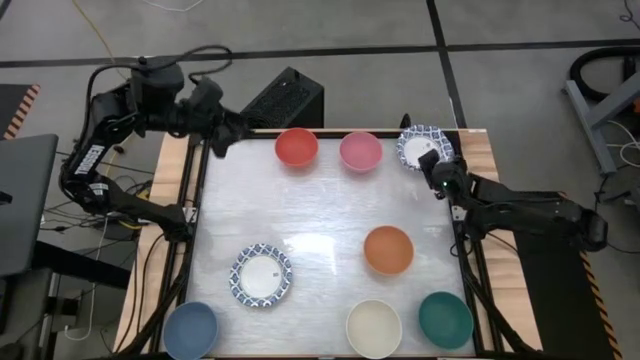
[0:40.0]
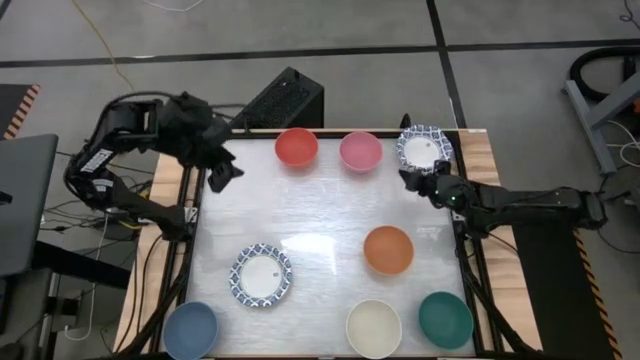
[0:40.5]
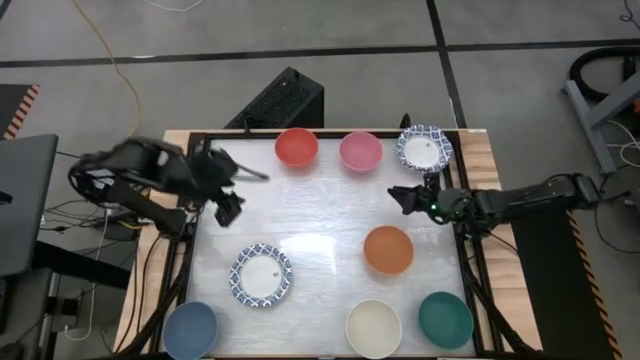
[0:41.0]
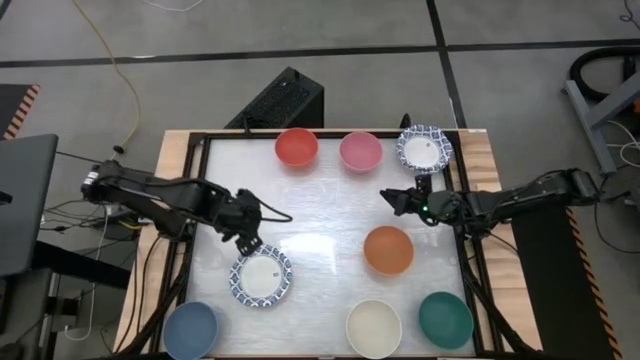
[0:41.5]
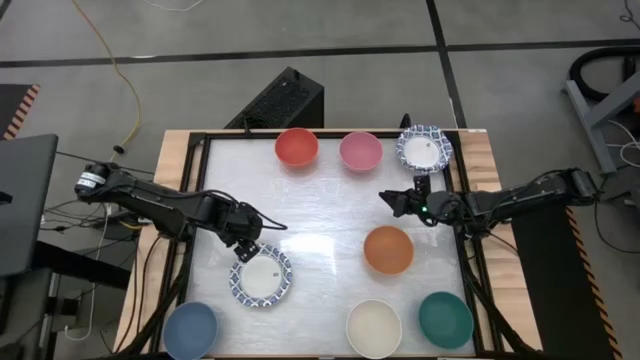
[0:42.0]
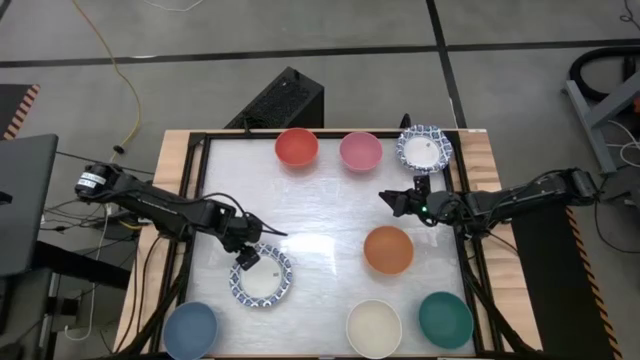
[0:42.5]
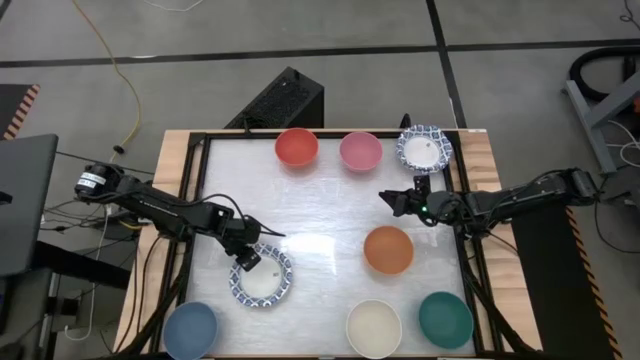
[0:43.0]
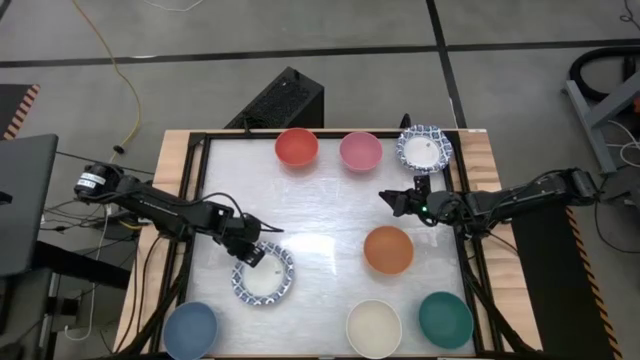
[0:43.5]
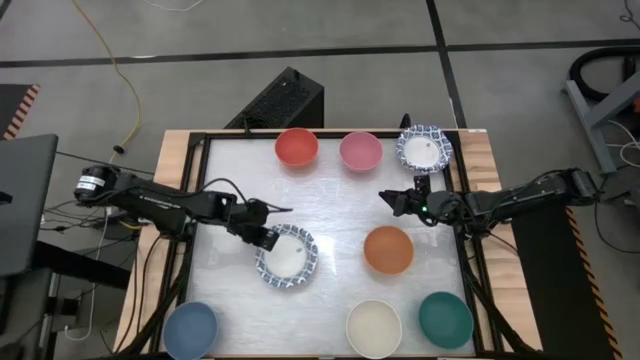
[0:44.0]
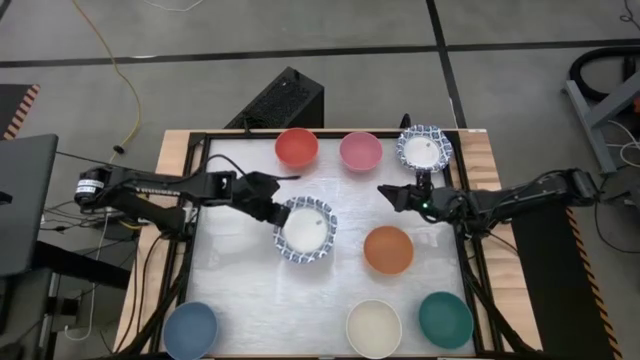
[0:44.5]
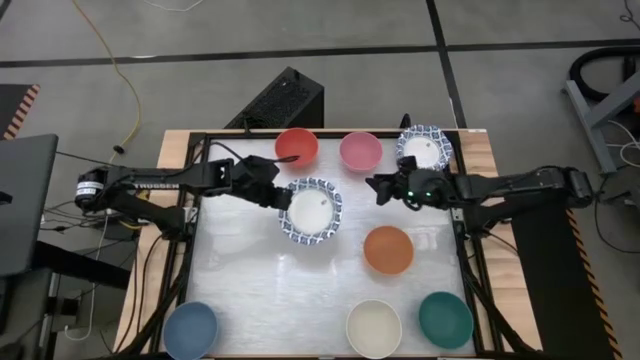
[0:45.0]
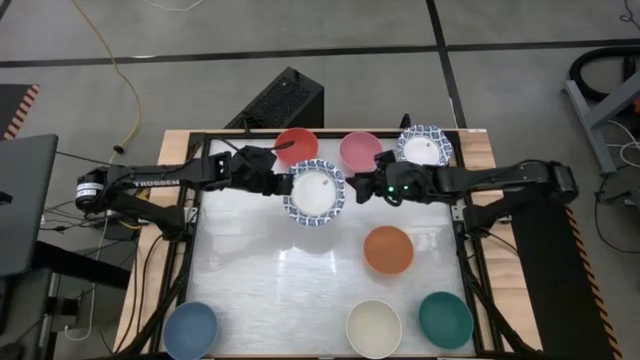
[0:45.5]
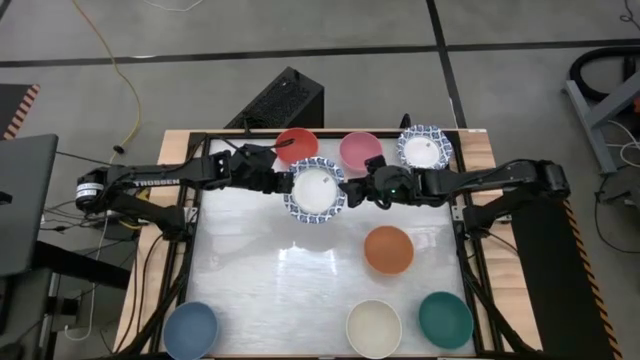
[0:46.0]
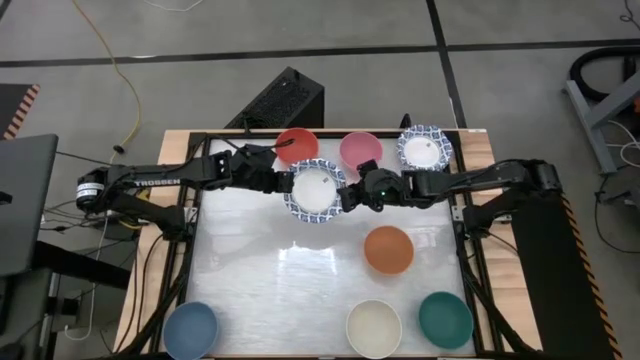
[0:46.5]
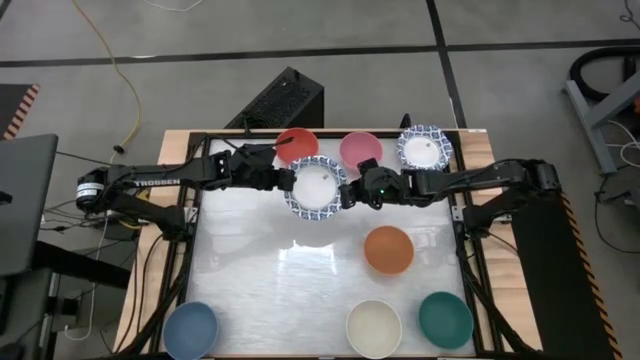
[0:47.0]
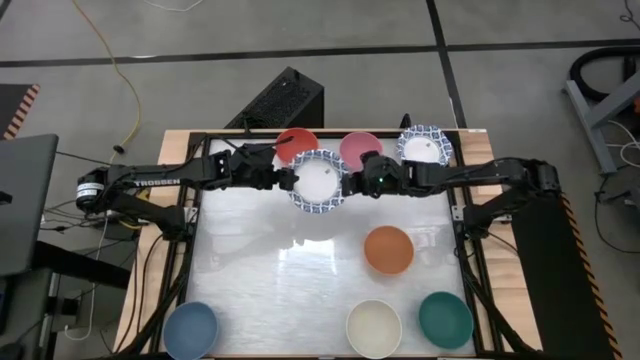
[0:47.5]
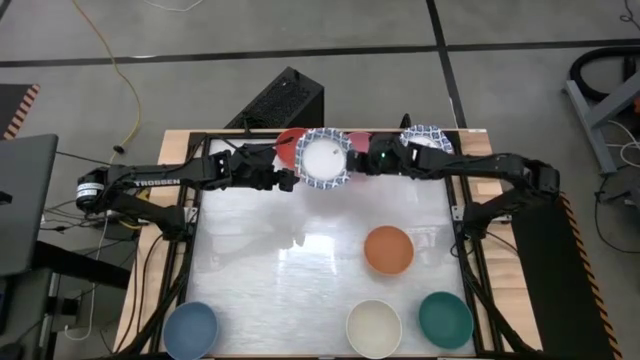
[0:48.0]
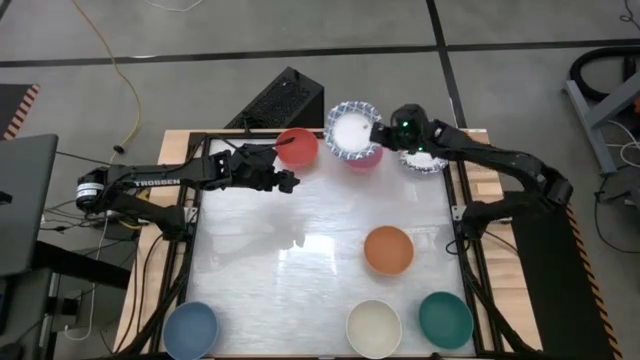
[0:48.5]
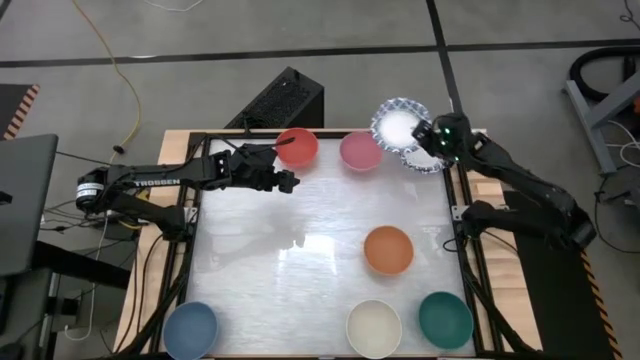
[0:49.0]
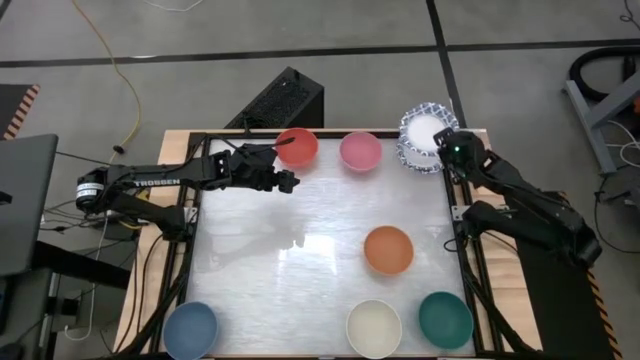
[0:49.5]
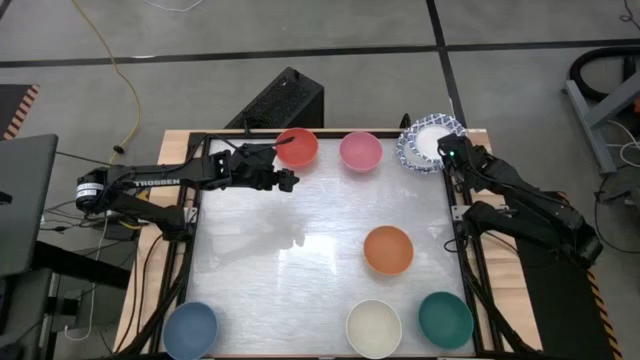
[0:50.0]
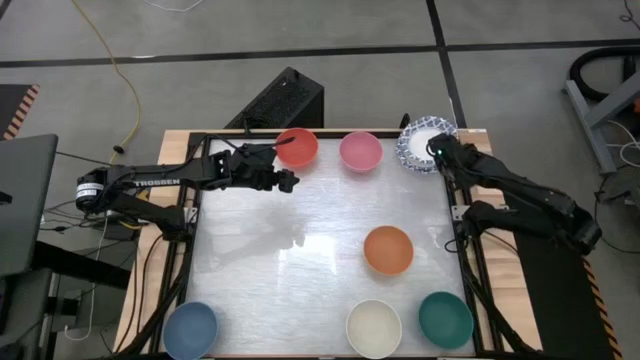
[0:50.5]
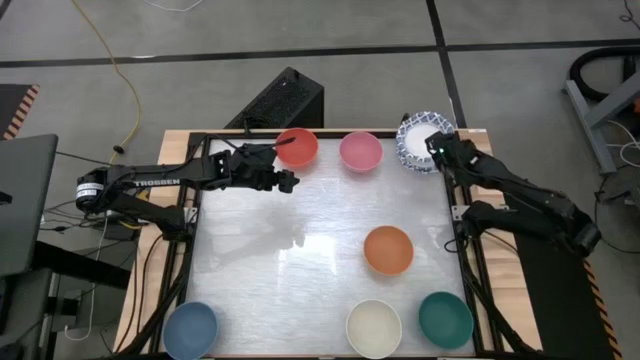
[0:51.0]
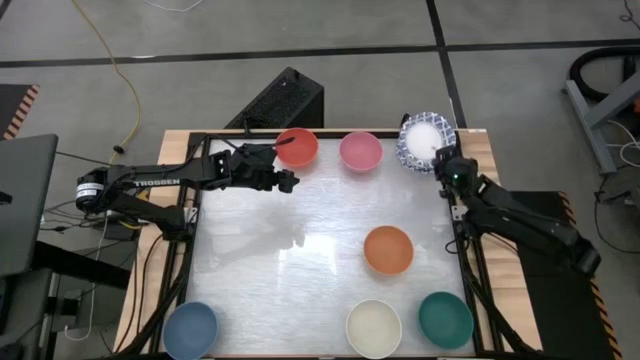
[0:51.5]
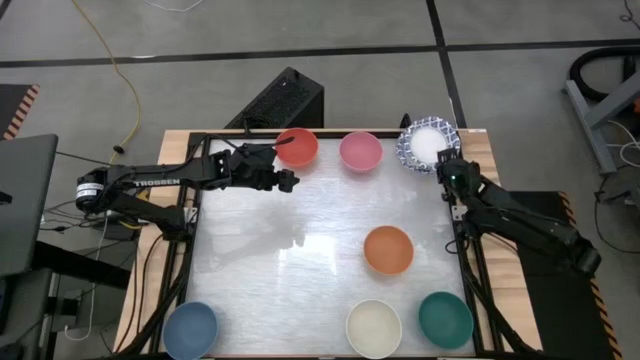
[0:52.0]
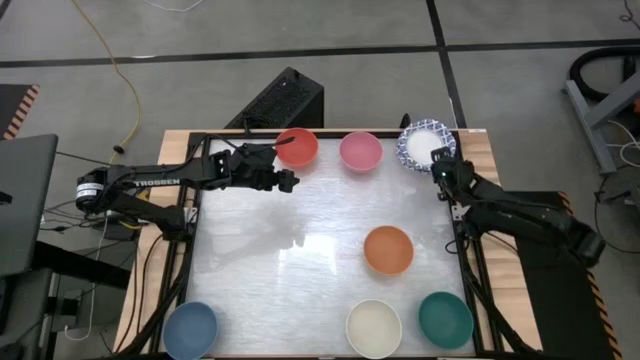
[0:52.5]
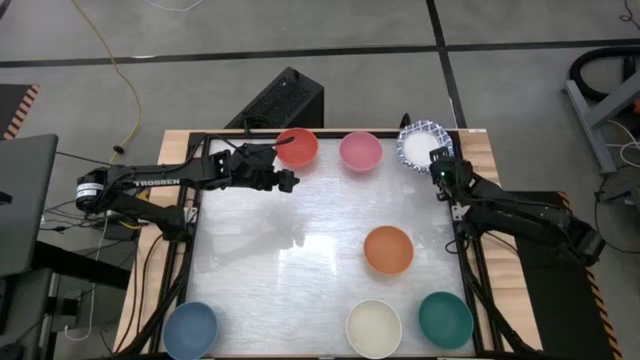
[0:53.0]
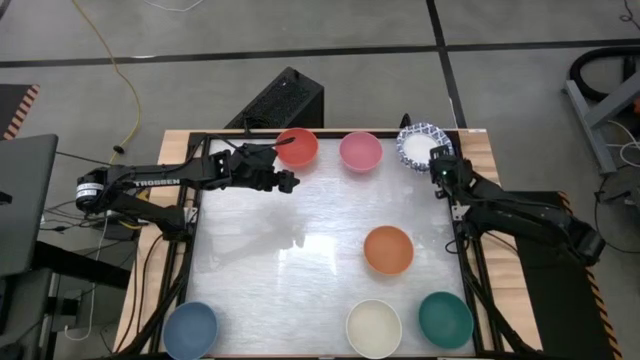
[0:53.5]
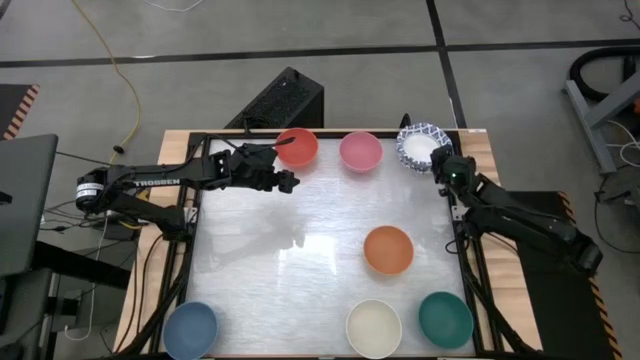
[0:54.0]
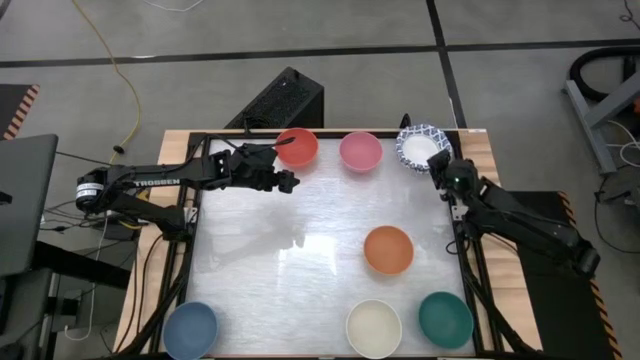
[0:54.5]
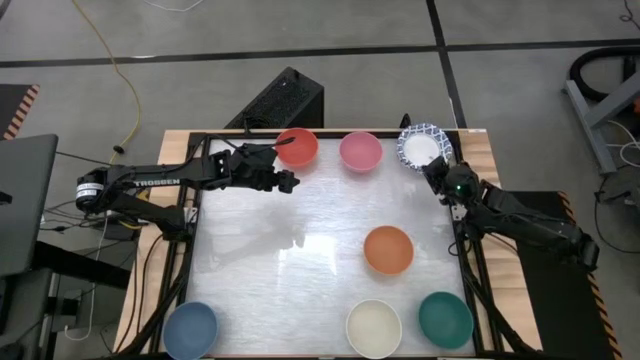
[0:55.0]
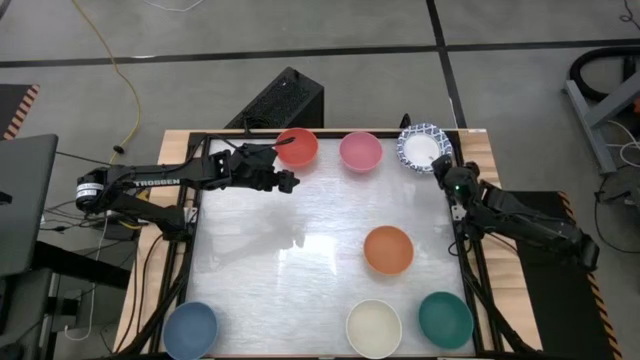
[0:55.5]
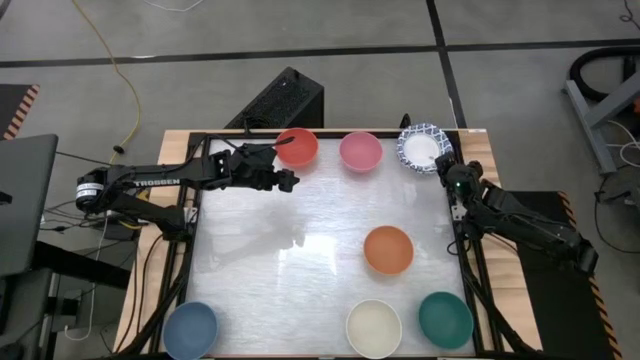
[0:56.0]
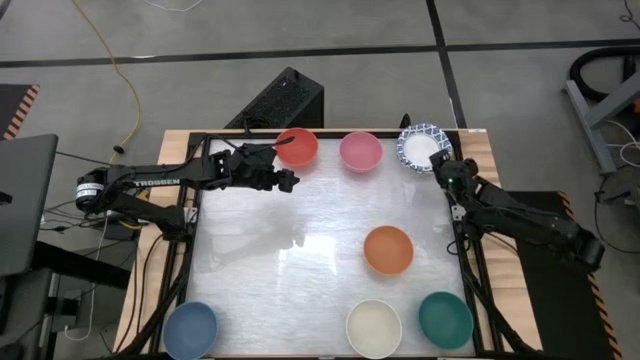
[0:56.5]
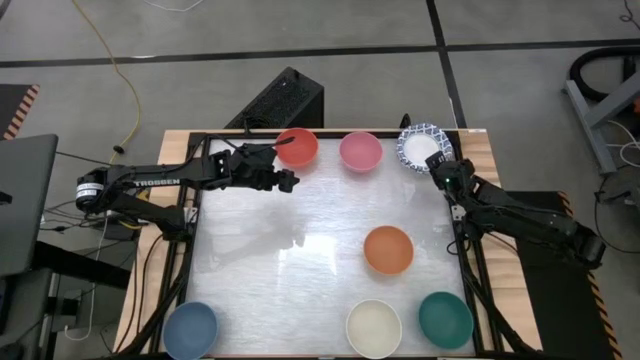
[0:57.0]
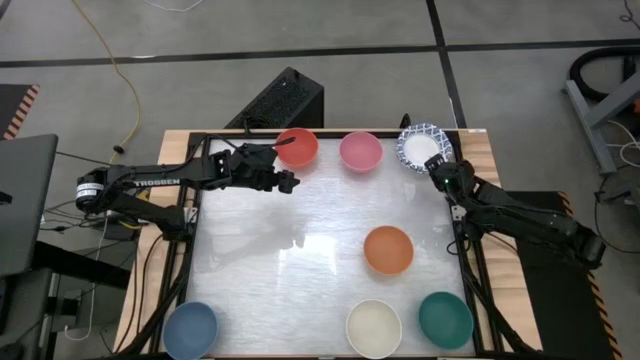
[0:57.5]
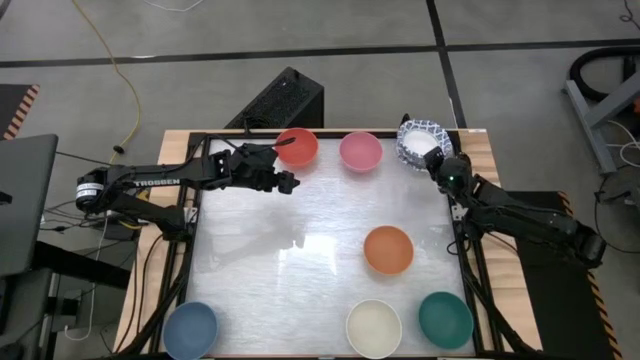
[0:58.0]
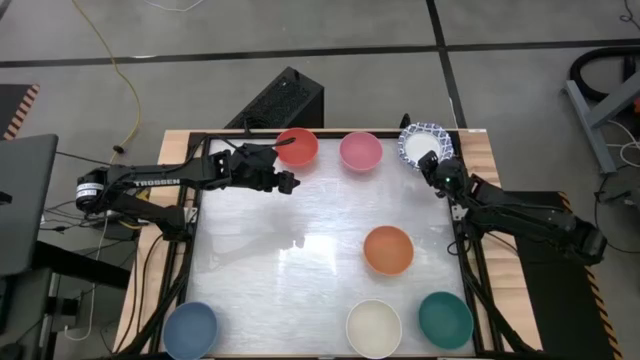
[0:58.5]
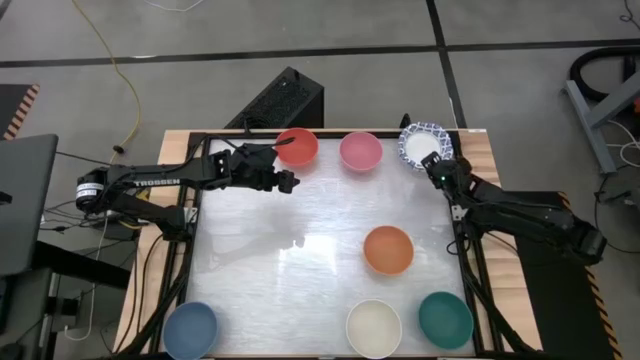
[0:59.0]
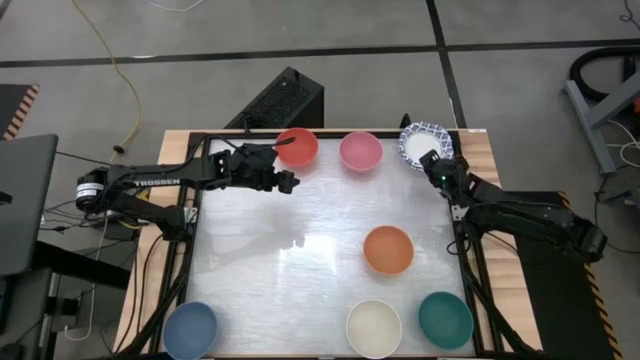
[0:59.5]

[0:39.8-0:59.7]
Stack the blue patterned bowl on top of the blue patterned bowl
